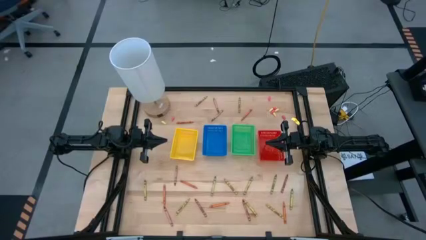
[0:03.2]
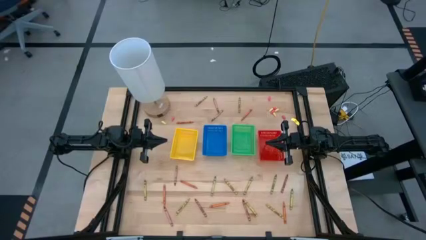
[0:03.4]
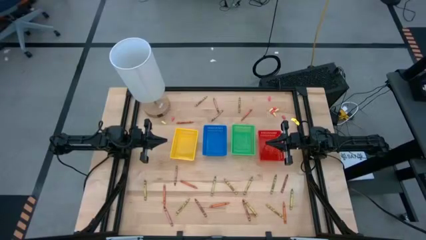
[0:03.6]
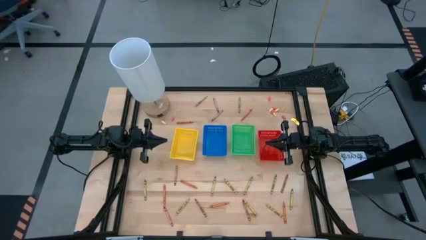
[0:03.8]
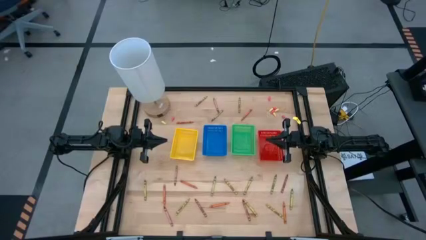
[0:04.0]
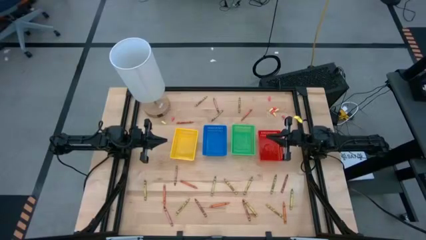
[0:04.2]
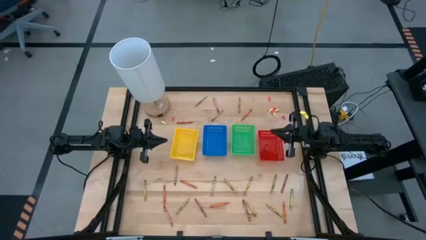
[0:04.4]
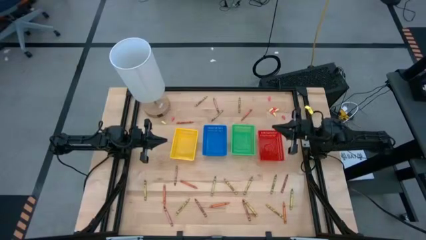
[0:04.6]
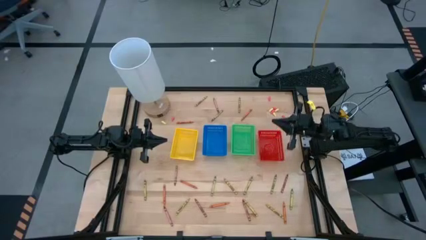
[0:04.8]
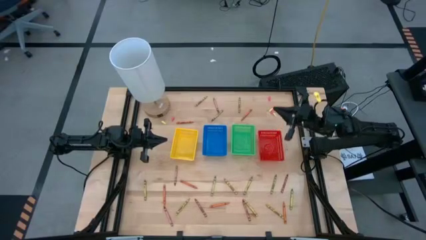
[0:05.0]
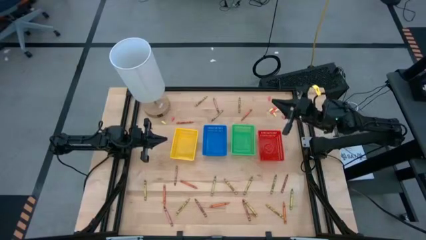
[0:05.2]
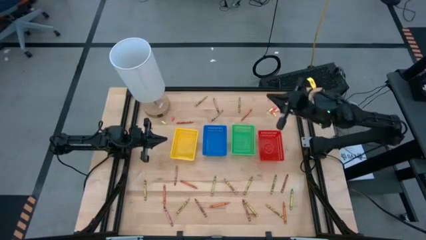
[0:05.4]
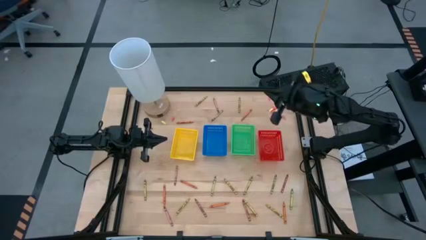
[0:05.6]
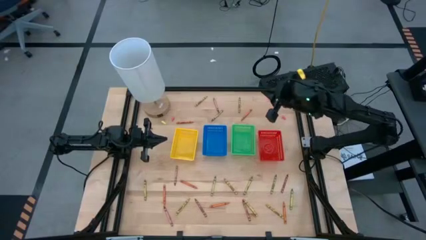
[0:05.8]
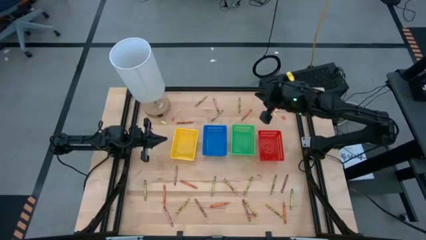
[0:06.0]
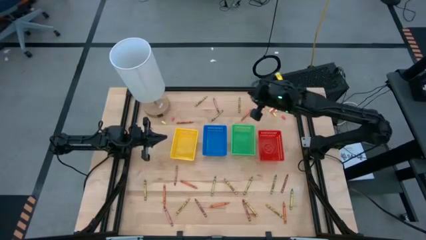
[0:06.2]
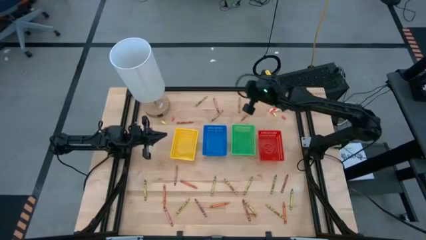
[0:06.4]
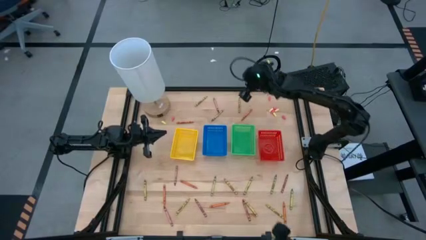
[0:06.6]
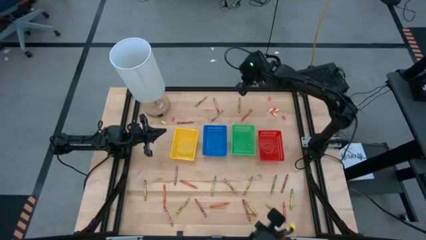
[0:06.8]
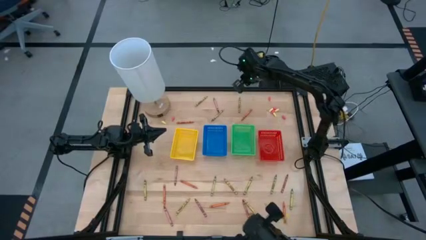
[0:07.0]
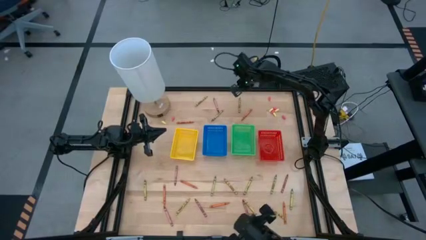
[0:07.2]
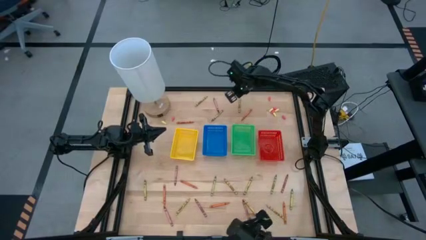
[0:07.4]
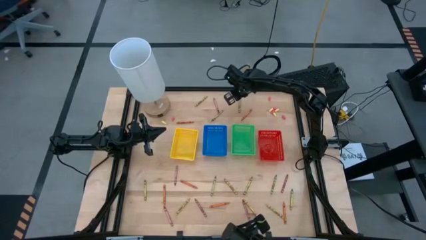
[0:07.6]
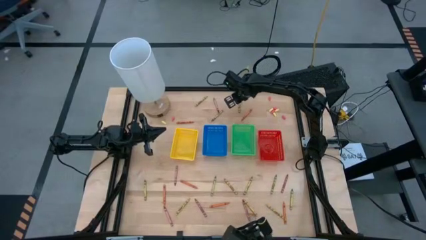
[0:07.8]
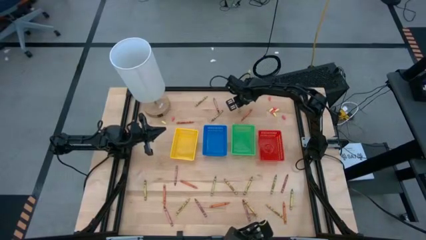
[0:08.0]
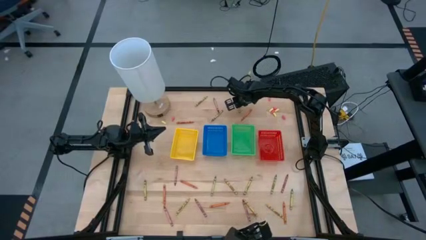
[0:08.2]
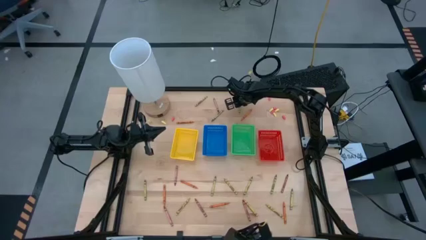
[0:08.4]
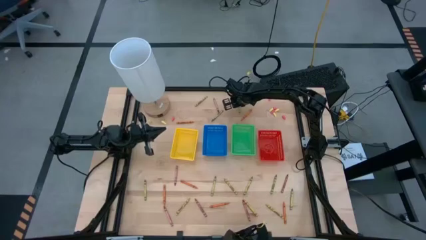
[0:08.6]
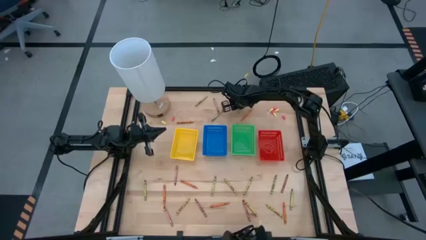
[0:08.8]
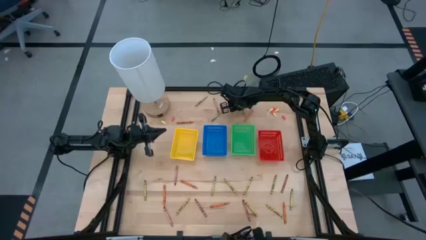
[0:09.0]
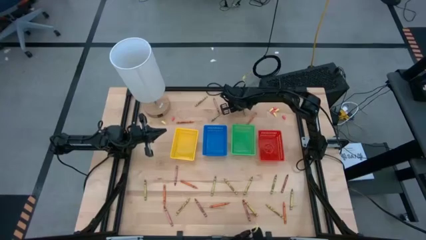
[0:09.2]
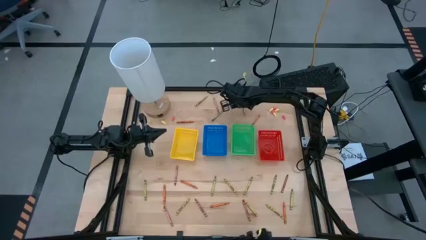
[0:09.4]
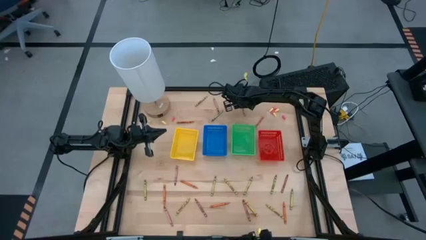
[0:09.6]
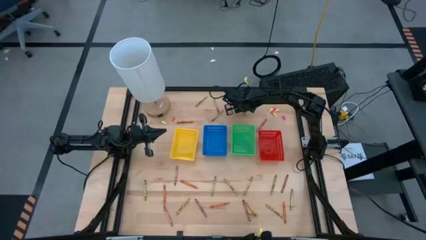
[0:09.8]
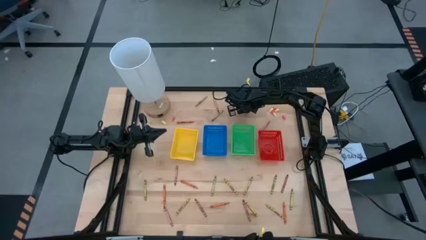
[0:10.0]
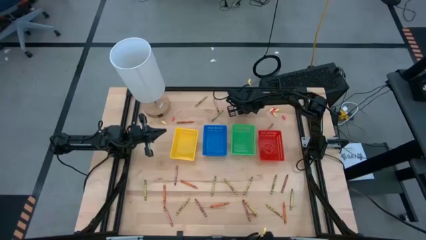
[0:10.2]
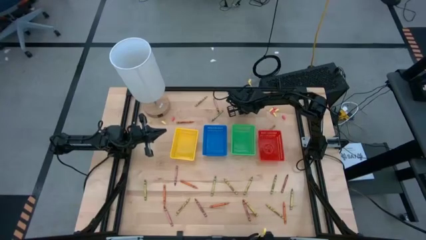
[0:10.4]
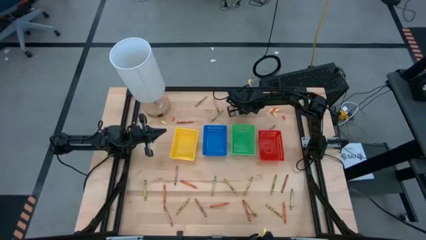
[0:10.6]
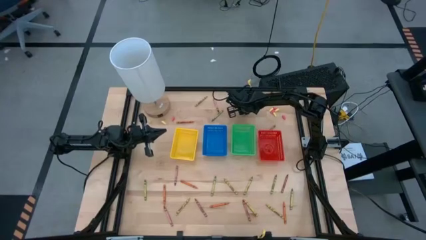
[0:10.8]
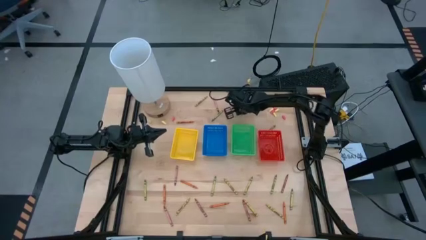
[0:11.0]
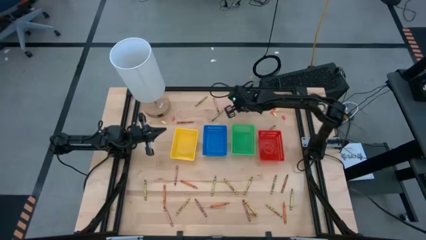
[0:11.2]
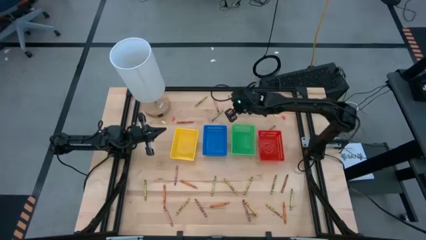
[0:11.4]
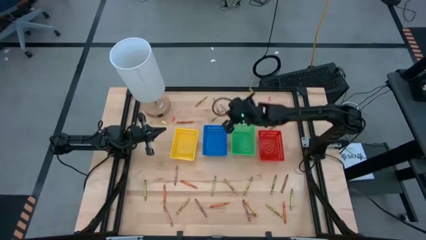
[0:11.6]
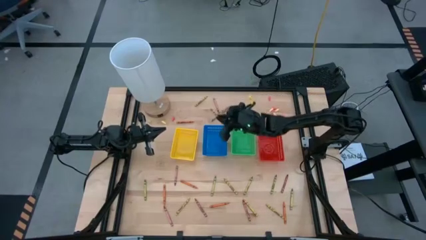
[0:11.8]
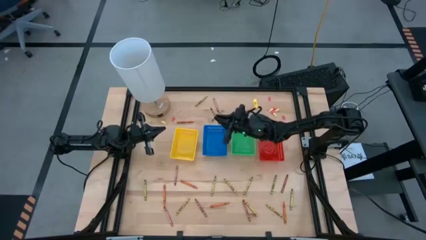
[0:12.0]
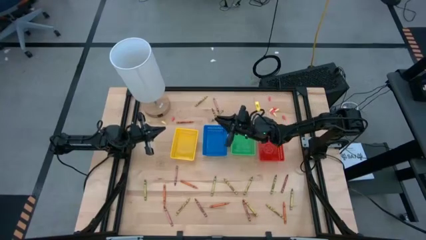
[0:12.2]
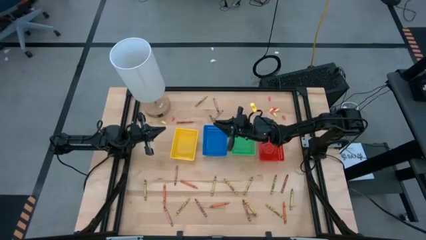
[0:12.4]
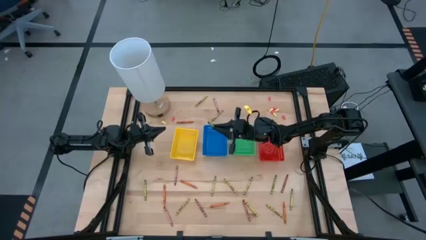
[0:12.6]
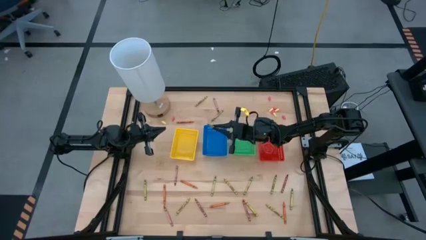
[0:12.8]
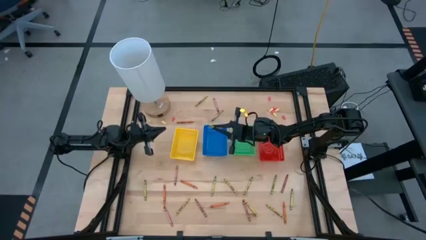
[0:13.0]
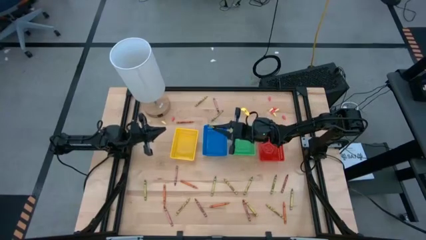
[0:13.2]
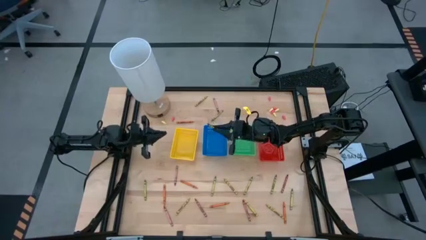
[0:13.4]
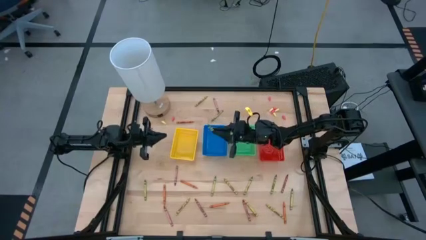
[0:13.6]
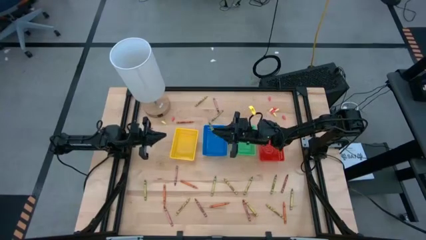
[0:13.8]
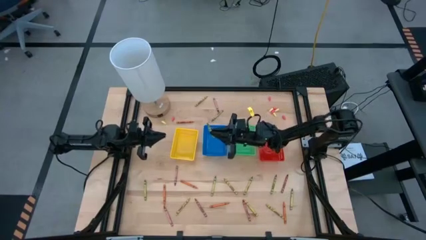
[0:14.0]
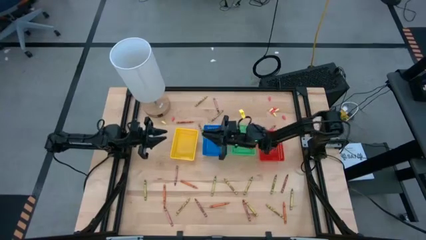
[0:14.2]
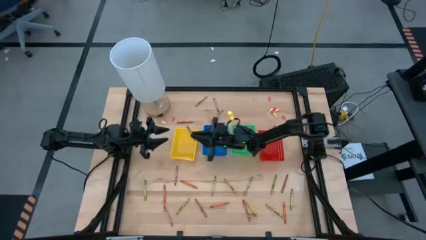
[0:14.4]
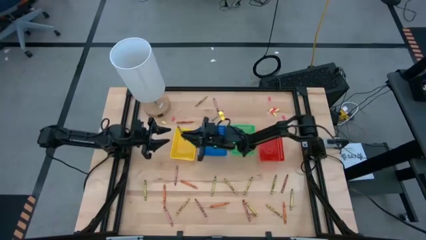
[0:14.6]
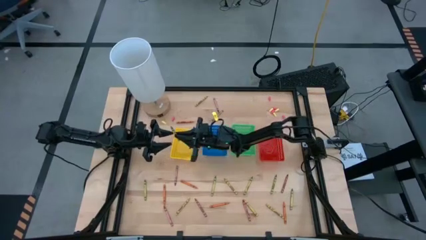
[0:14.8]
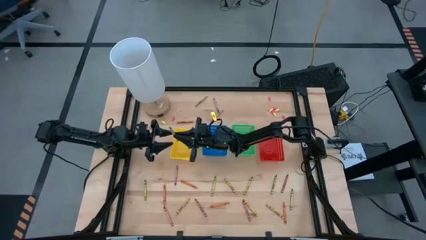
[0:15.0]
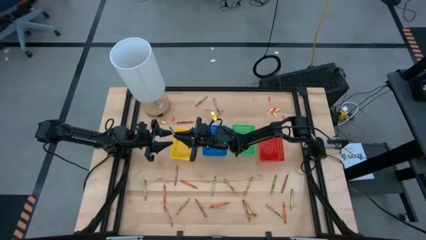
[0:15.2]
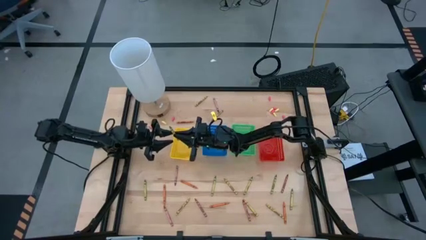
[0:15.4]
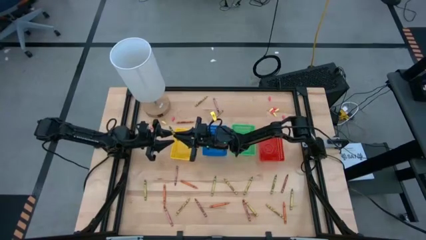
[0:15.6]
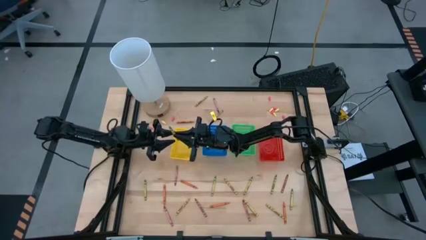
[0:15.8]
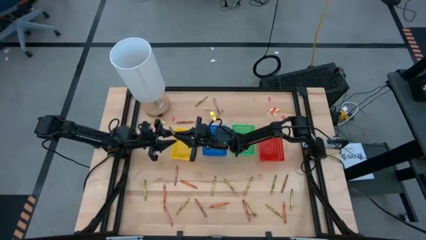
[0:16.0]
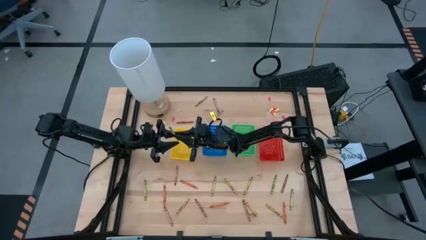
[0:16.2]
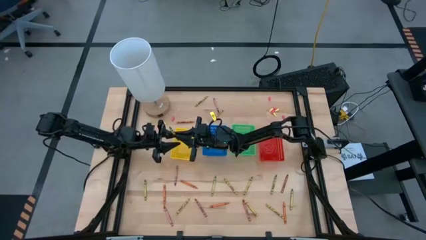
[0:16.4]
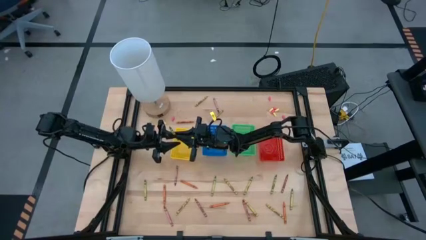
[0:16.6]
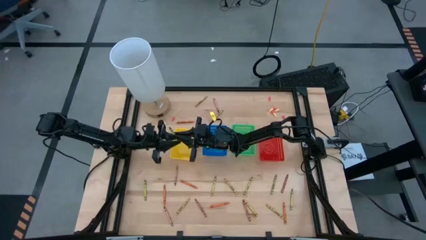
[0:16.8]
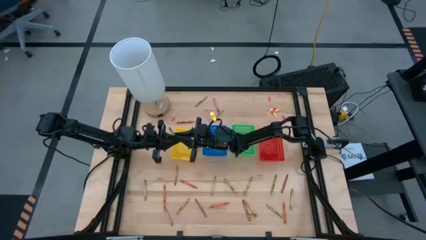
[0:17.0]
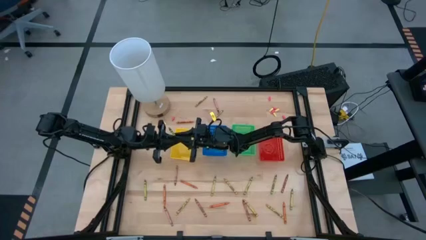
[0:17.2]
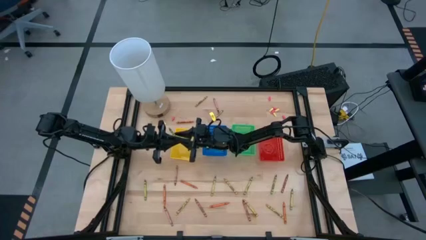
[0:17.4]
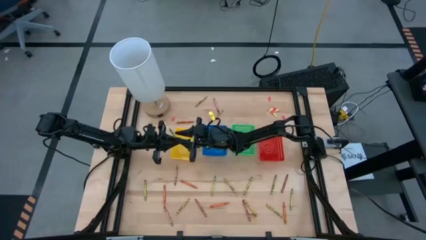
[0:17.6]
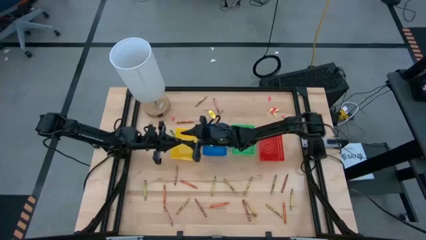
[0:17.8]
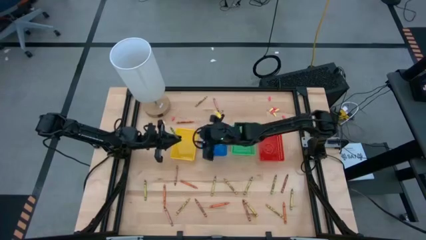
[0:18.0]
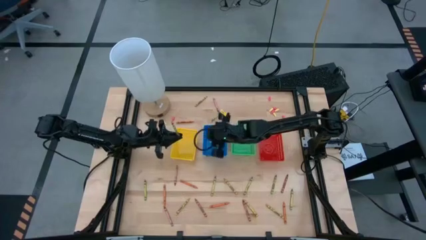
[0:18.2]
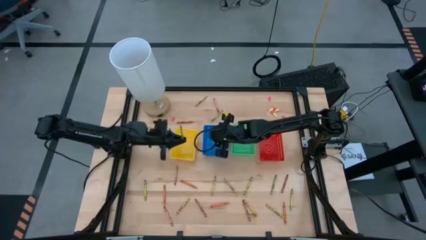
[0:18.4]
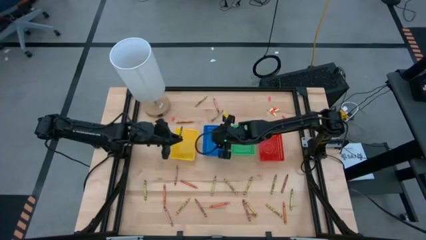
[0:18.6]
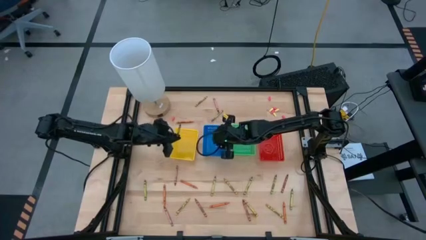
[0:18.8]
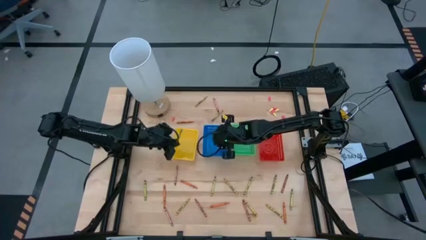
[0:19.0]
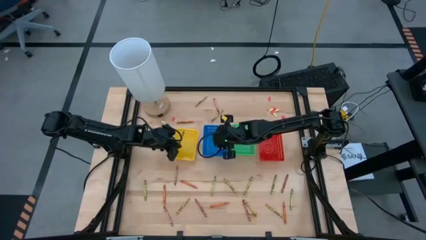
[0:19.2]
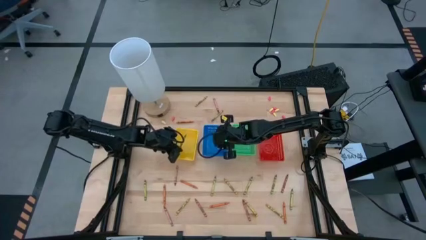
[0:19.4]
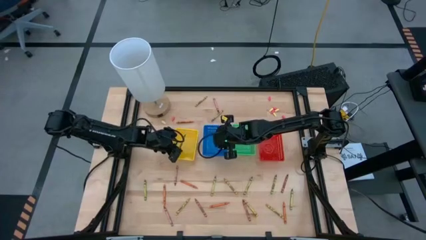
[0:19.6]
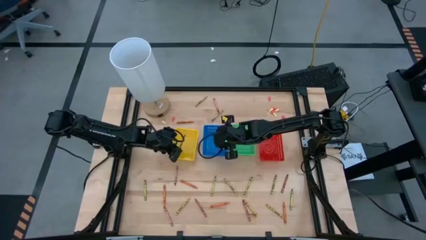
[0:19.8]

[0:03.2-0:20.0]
Task: Sort crayons
Put the green crayon into the yellow bin
